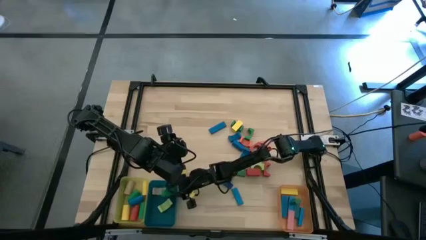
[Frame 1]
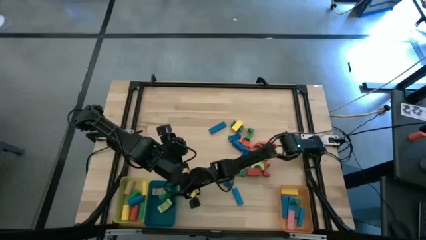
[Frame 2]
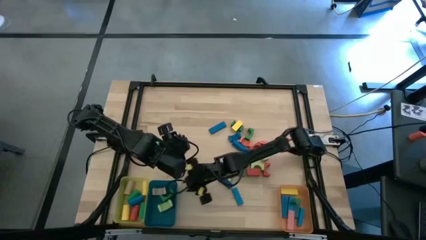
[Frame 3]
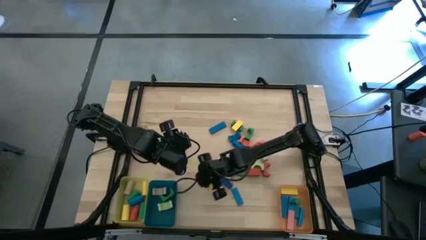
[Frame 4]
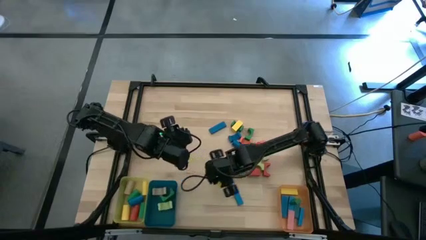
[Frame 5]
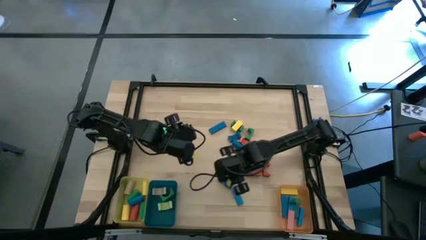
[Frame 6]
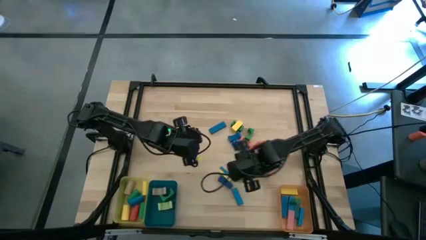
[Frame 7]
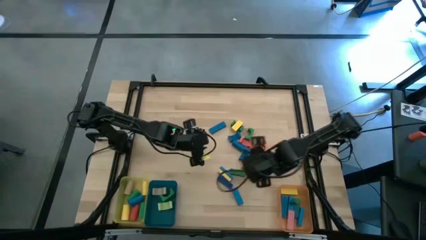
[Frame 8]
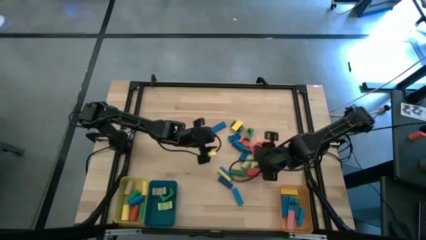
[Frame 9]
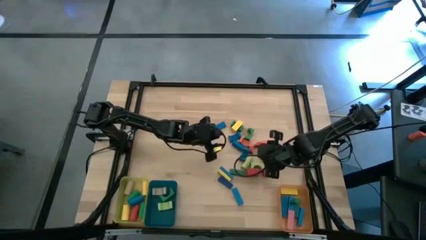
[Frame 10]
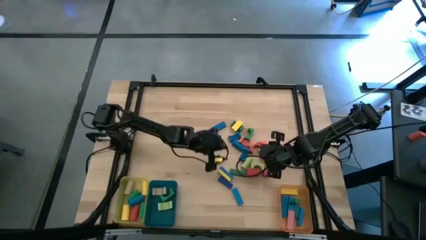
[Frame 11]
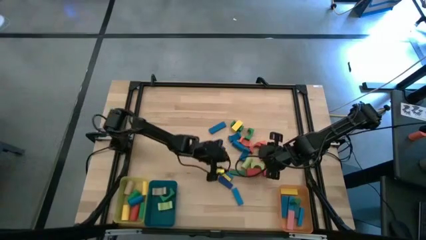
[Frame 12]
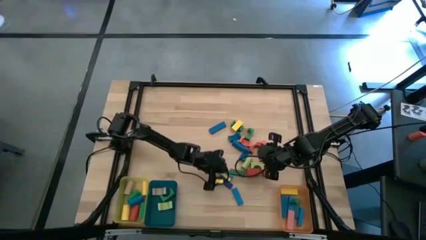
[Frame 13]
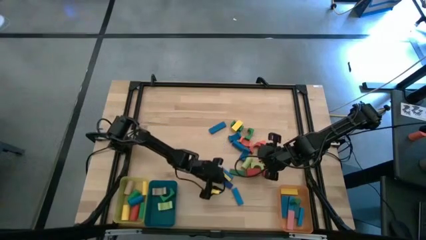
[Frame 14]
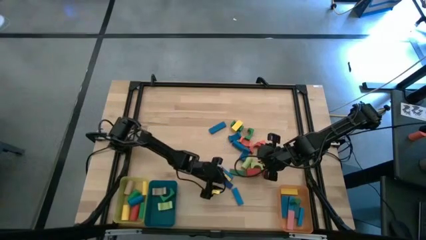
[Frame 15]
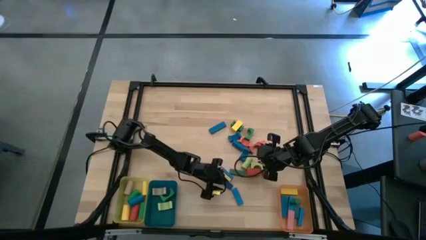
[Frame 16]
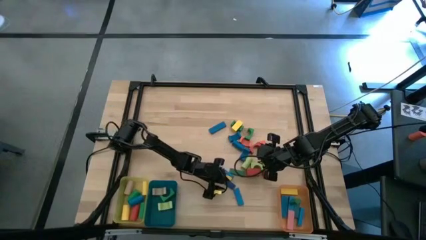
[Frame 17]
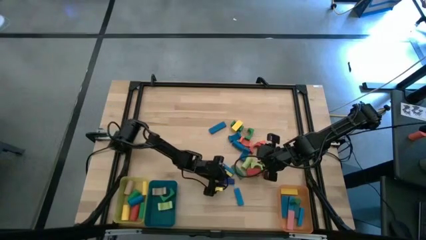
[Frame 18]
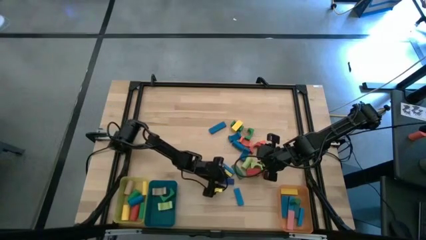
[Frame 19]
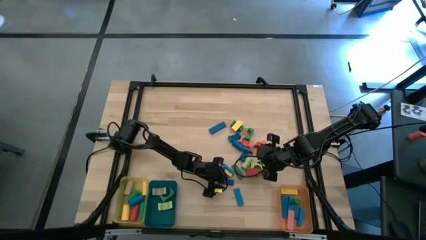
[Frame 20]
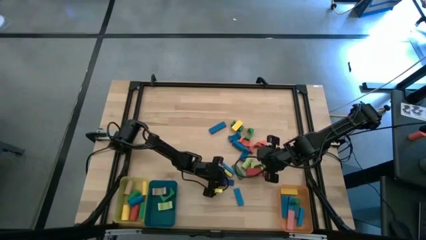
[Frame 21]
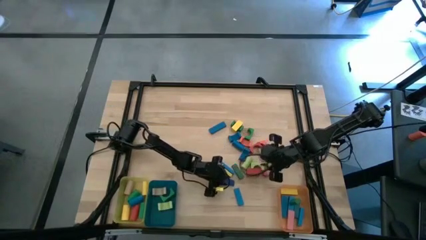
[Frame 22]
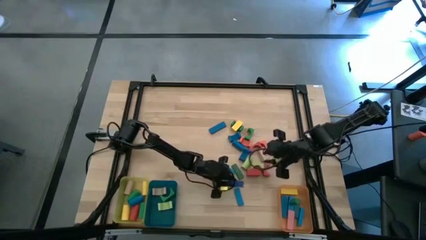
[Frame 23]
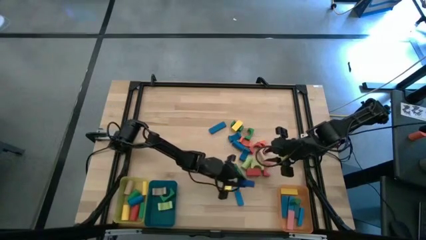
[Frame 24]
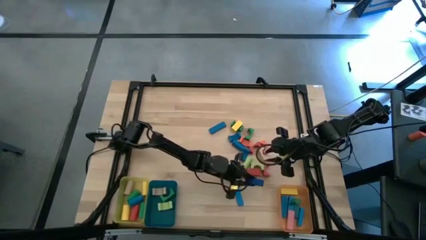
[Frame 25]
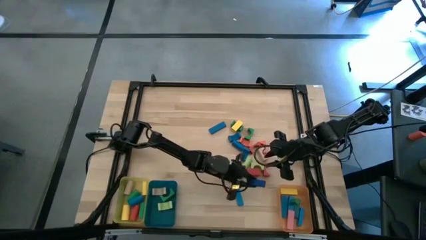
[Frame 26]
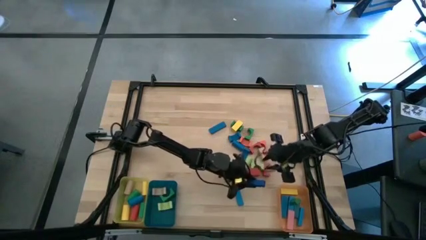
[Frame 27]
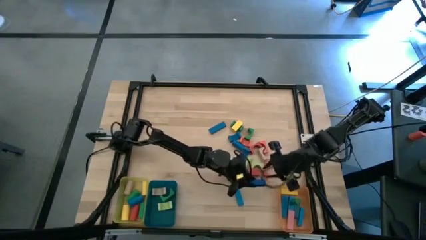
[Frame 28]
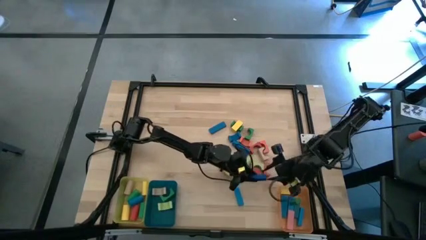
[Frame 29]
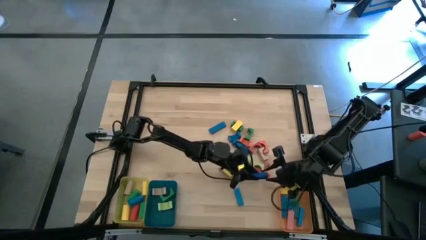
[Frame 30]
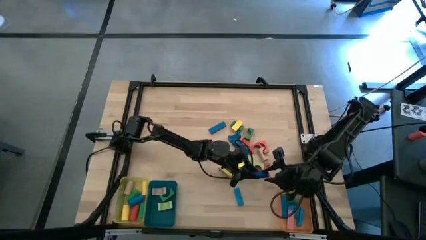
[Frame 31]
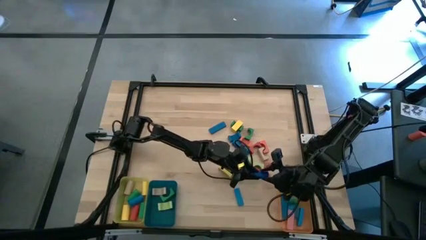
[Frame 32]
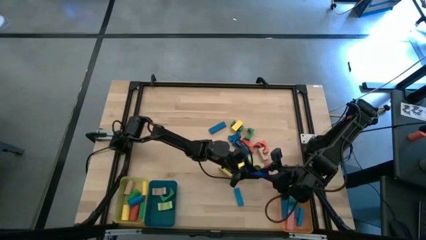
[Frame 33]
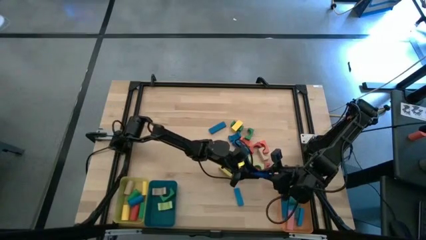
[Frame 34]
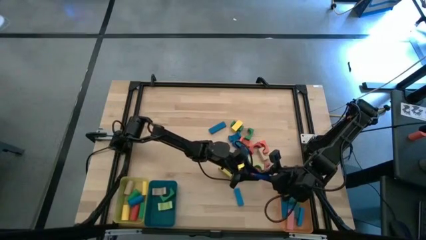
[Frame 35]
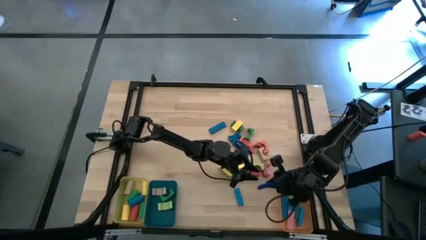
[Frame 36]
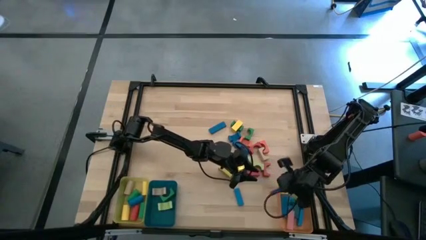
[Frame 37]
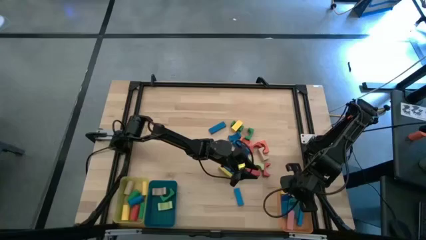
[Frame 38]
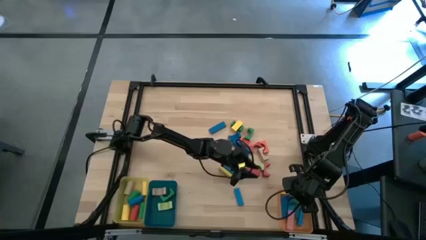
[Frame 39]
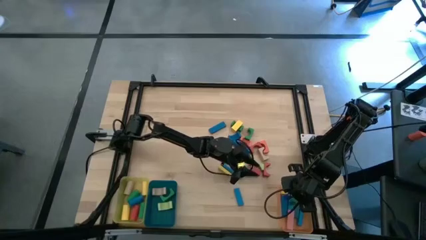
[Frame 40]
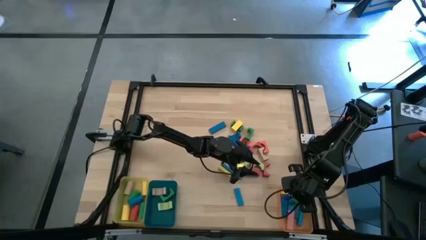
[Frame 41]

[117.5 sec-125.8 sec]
Task: Sort blocks by size
Put the dark blue rectangular block into the orange bin

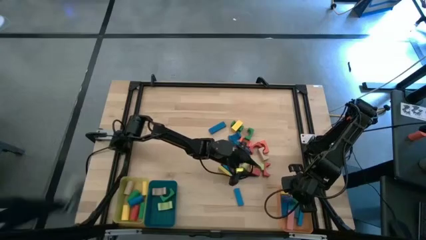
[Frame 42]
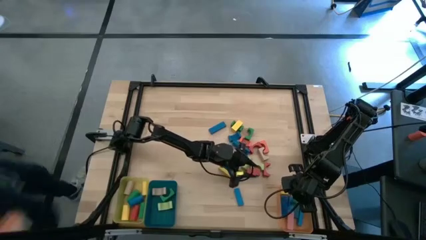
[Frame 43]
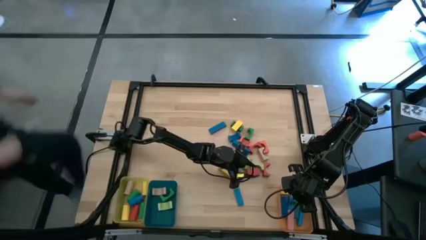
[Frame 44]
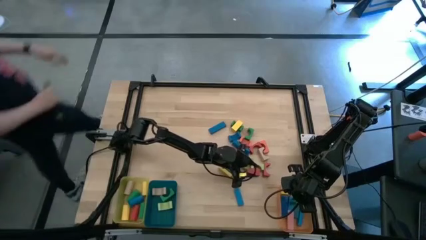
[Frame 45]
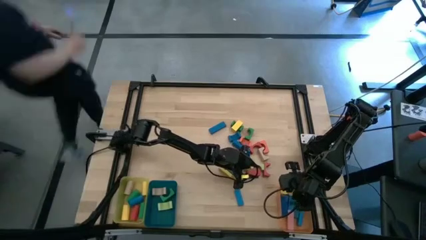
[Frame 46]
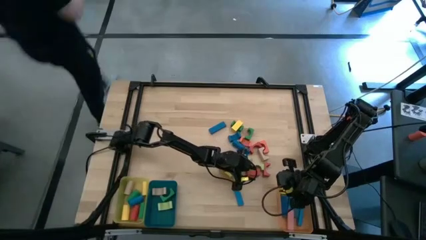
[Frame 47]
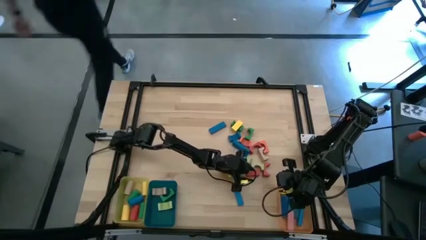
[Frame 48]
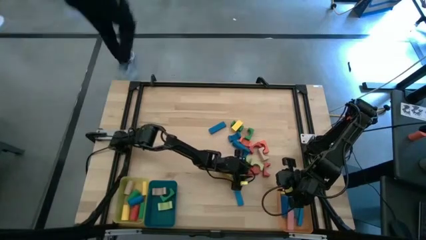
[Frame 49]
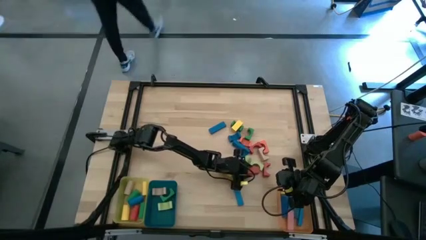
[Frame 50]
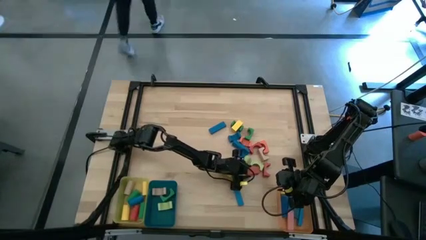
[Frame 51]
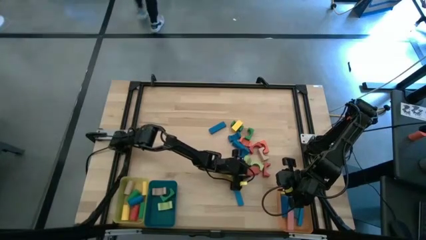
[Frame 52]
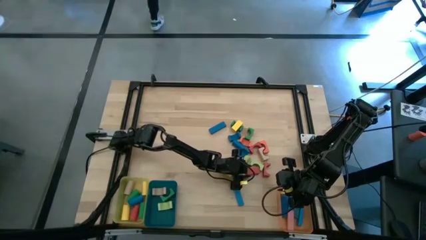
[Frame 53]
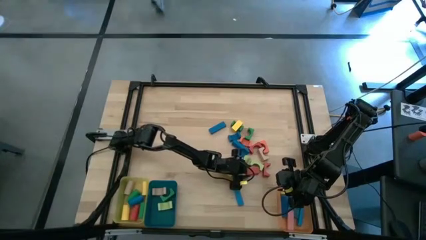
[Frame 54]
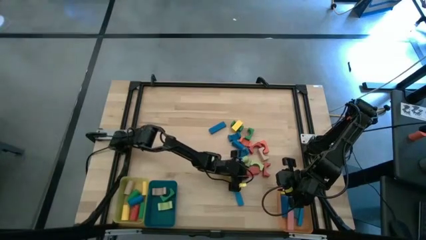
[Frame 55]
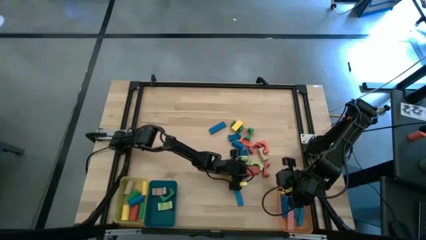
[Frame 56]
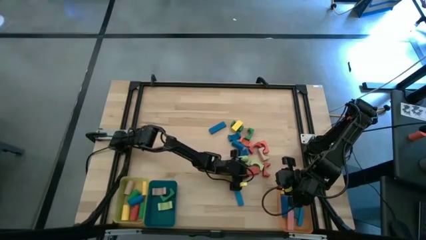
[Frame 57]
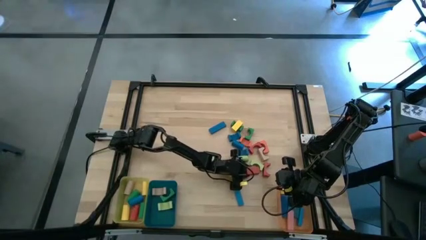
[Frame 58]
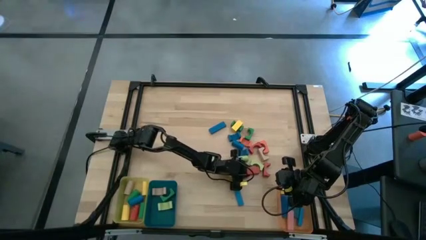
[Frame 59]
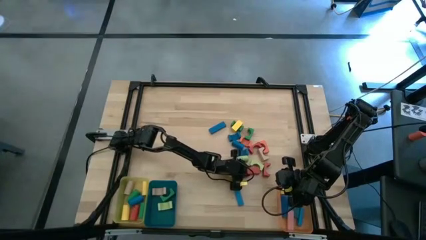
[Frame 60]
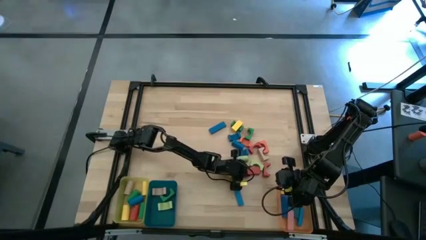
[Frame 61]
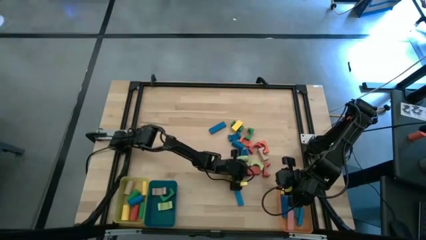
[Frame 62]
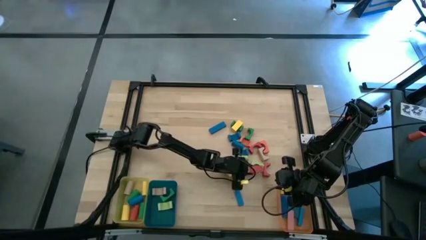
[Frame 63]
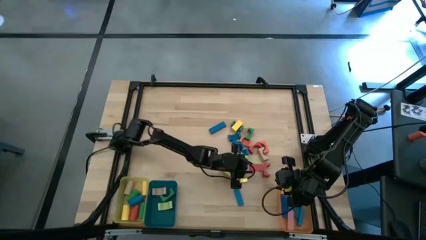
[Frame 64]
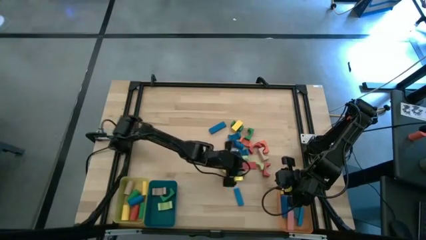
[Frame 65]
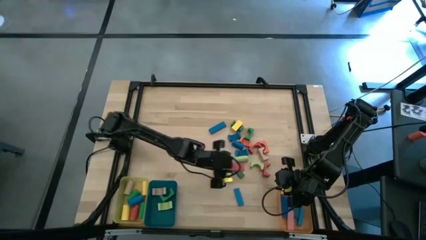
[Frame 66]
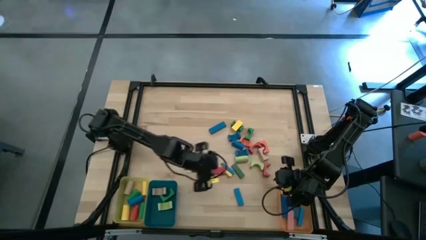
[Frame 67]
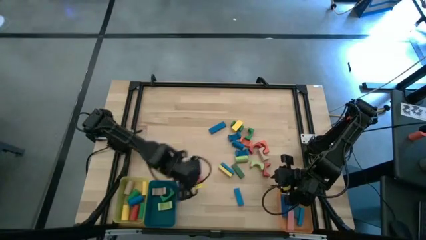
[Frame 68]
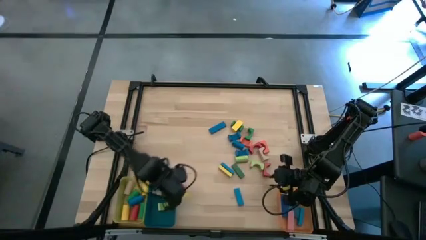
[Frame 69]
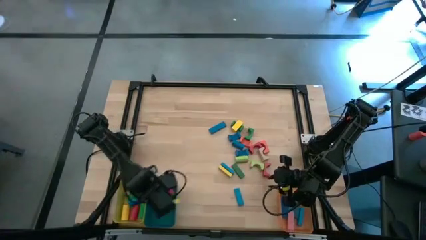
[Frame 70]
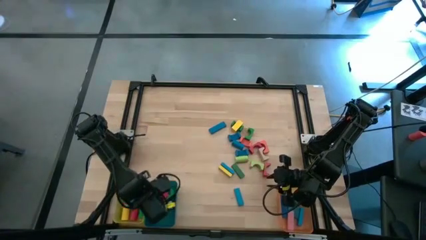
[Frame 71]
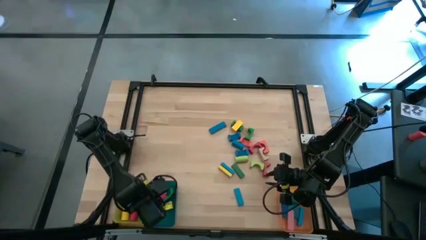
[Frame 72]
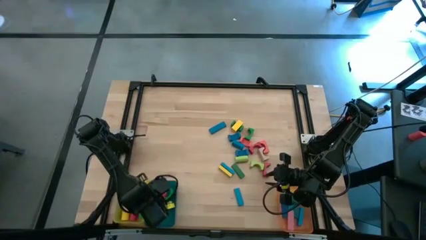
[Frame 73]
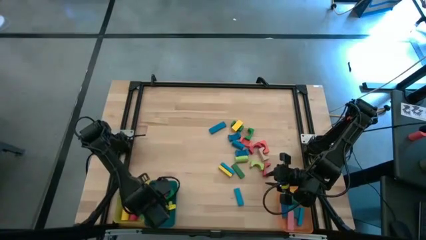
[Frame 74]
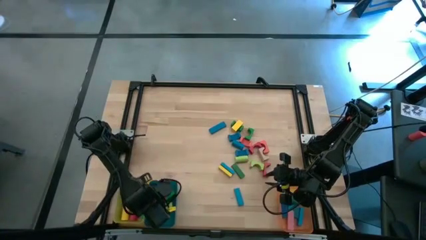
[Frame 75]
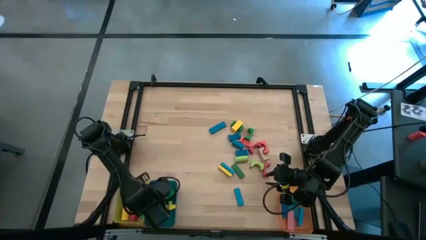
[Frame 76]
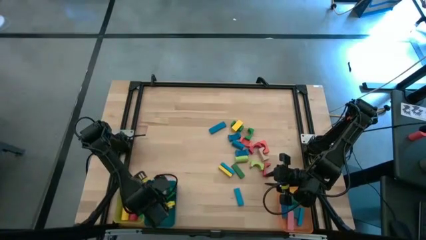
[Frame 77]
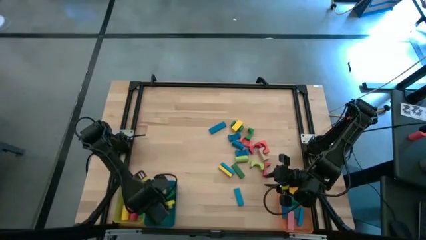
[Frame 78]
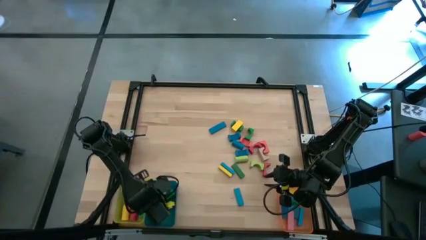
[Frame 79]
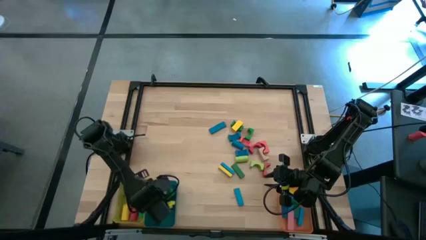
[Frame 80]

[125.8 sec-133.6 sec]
Put the red arch block into the blue bin

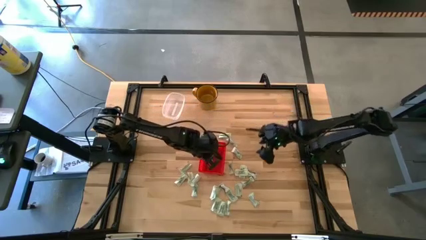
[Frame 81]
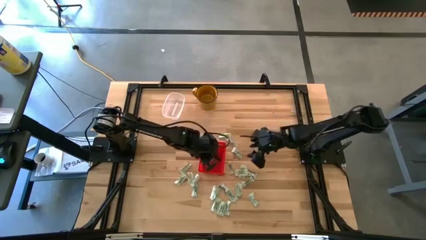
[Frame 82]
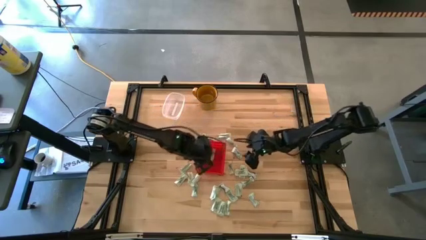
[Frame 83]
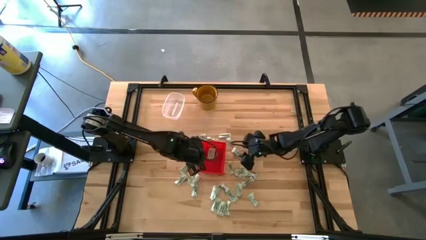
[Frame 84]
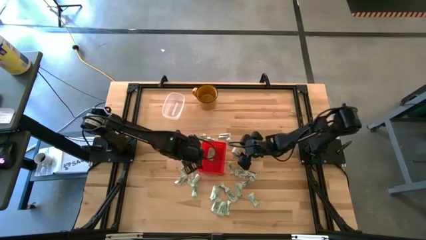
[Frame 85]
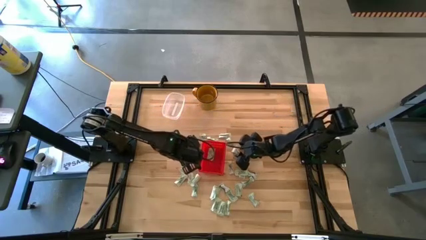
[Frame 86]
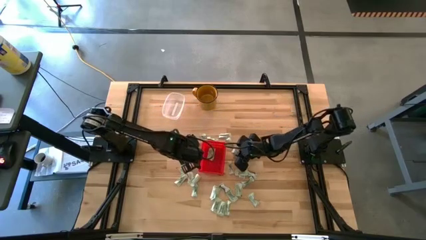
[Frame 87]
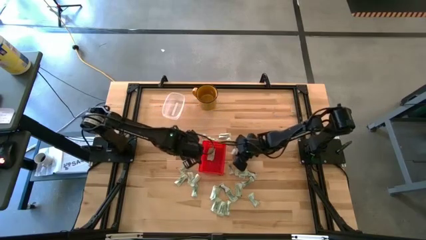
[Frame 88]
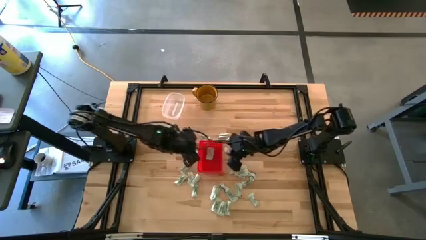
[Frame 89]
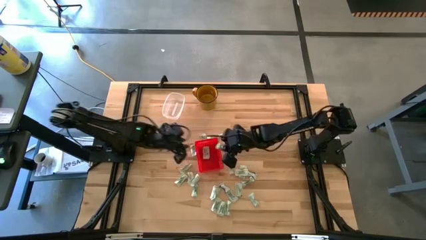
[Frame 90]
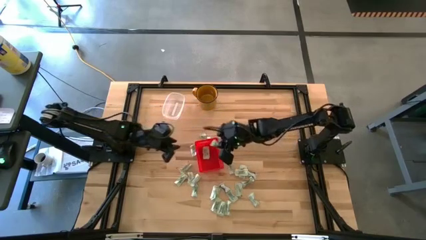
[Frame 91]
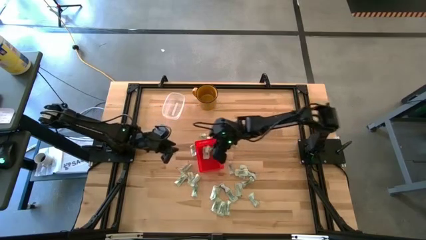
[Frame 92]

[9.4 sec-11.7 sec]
Task: Pick and place Stevia / Truvia into bins
Put the white stevia packet into the red basket

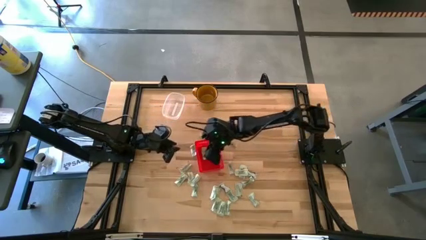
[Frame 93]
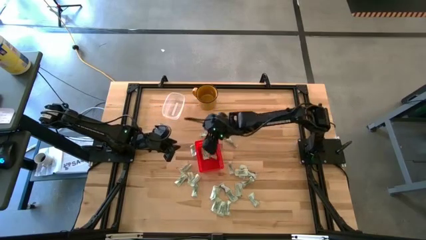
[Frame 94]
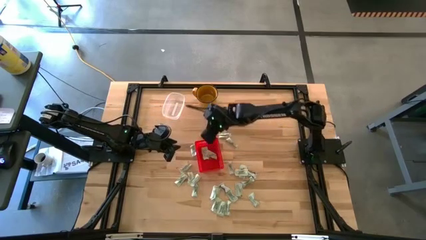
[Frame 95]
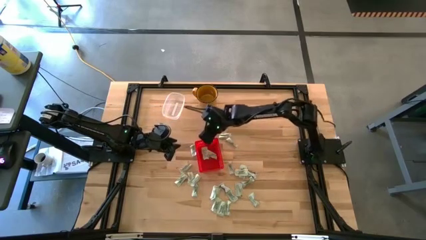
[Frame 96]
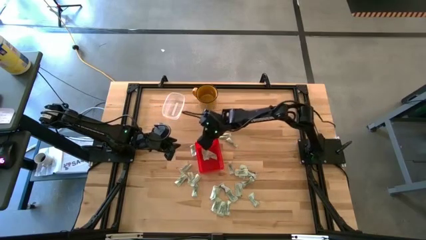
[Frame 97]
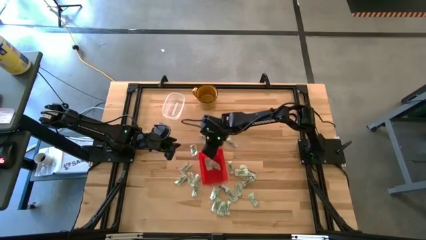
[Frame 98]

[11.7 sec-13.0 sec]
Adjust the red basket
